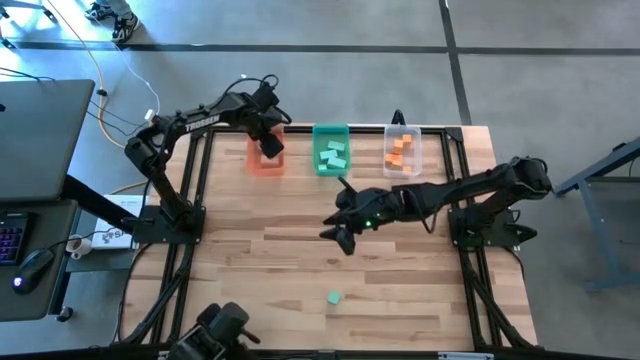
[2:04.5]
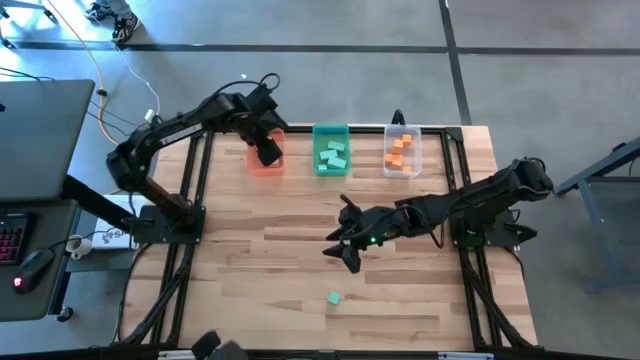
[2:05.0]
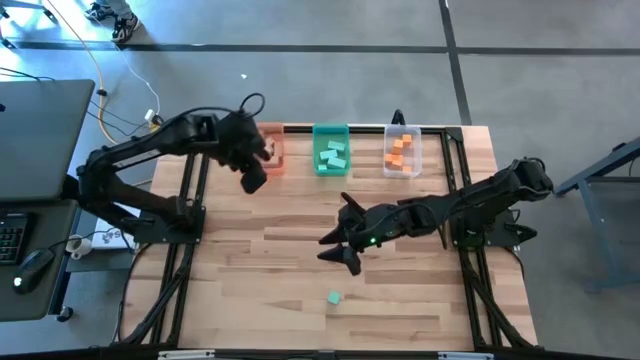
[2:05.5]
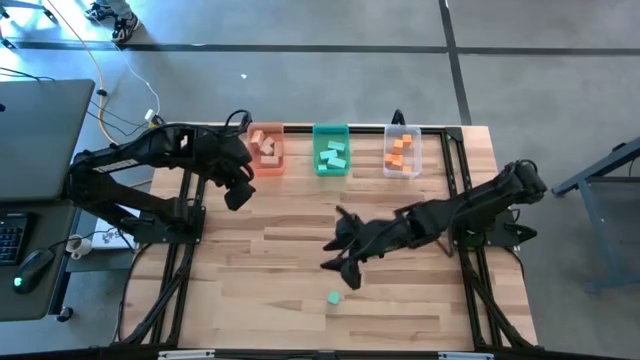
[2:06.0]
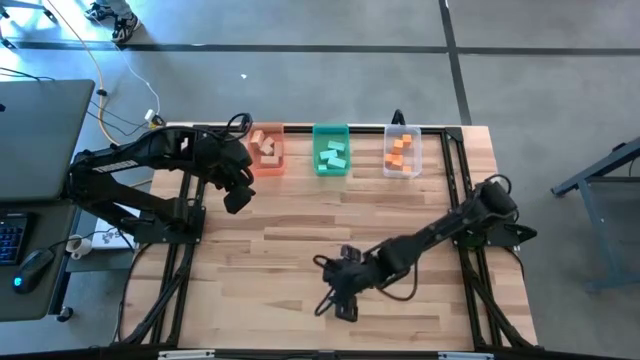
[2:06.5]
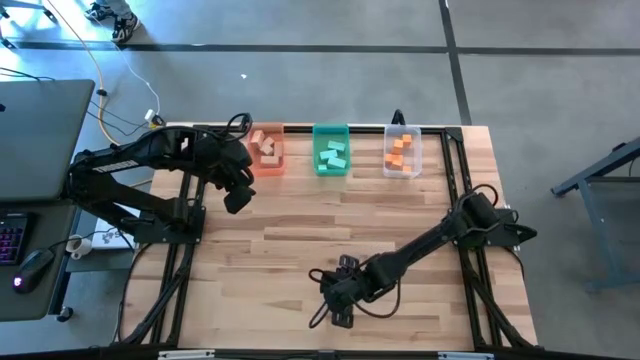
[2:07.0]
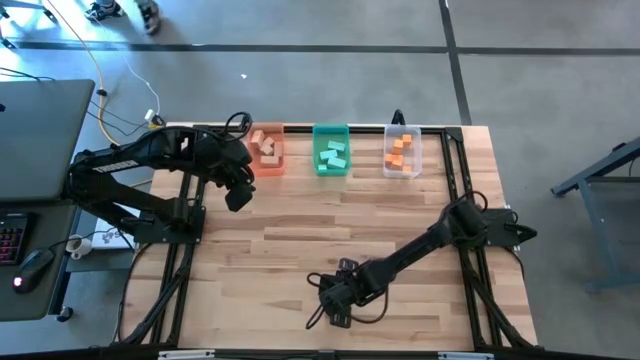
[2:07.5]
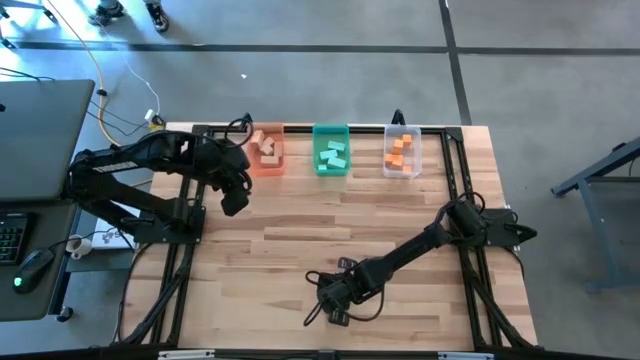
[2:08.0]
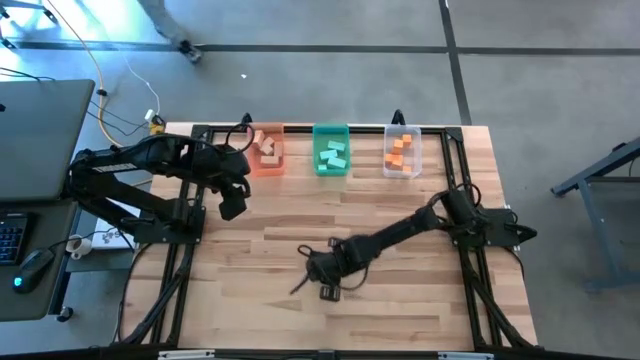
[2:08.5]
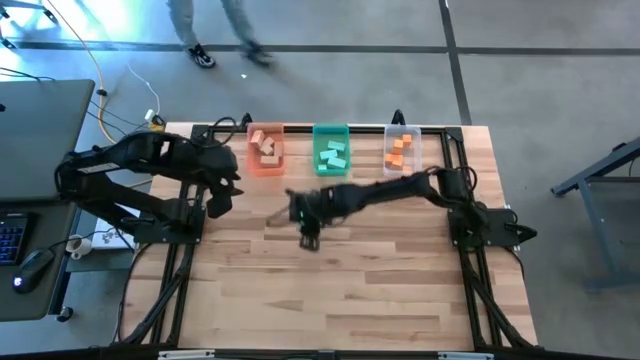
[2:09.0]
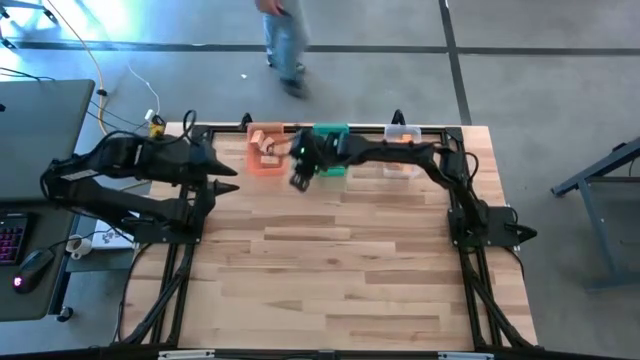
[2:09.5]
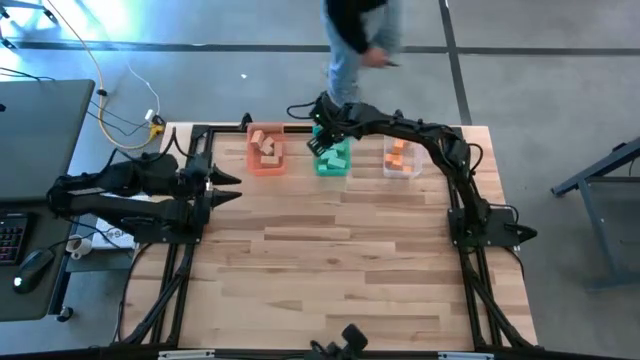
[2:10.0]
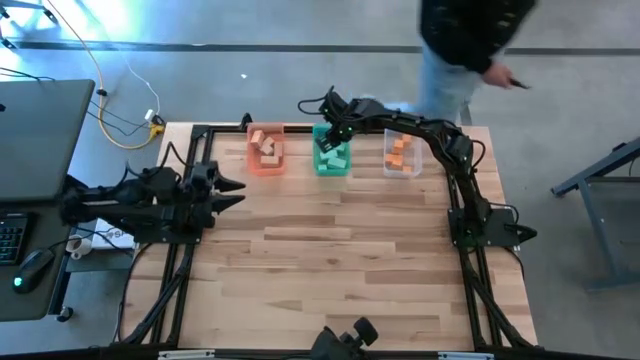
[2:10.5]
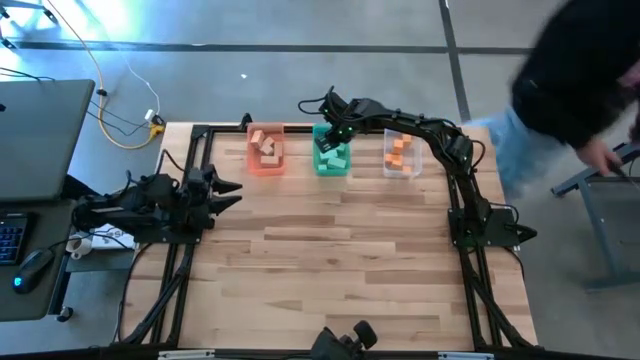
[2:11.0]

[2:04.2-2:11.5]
Task: Sort & place blocks by color
Put the blue block into the blue bin

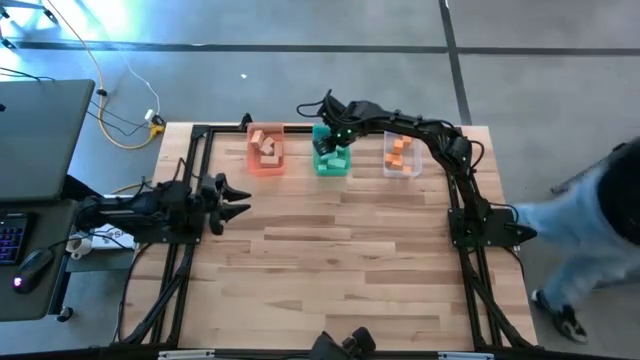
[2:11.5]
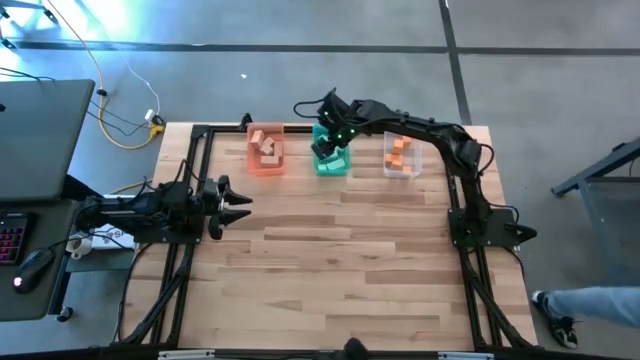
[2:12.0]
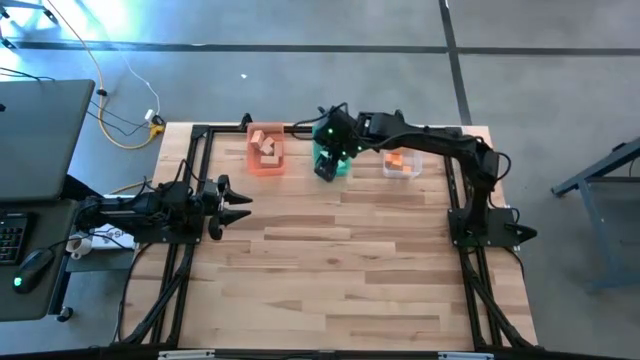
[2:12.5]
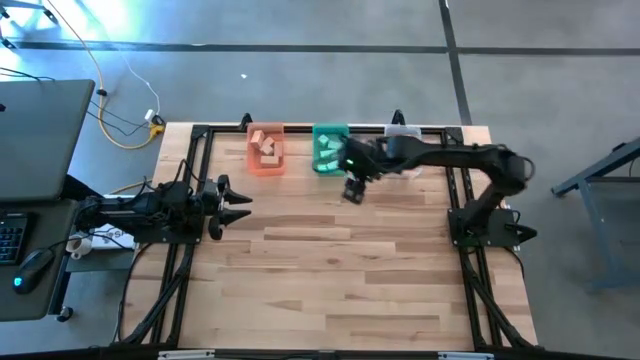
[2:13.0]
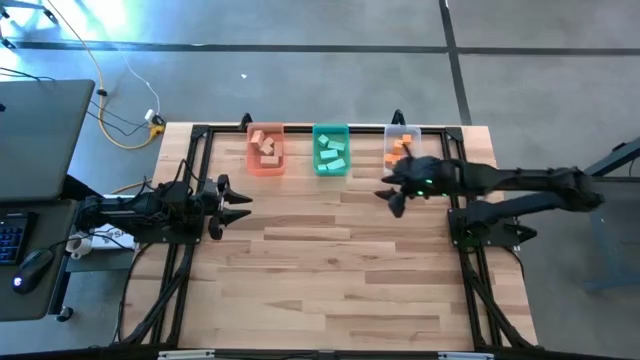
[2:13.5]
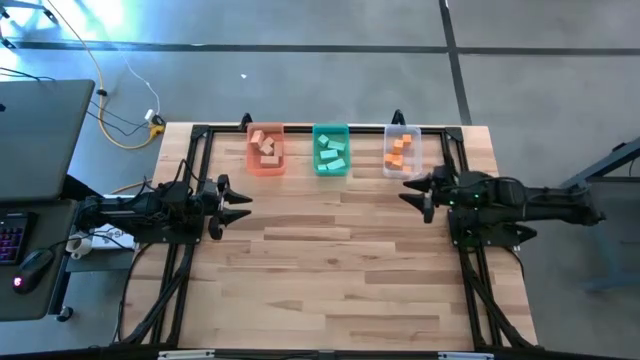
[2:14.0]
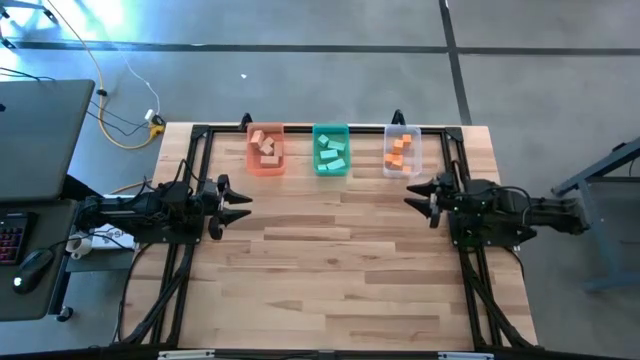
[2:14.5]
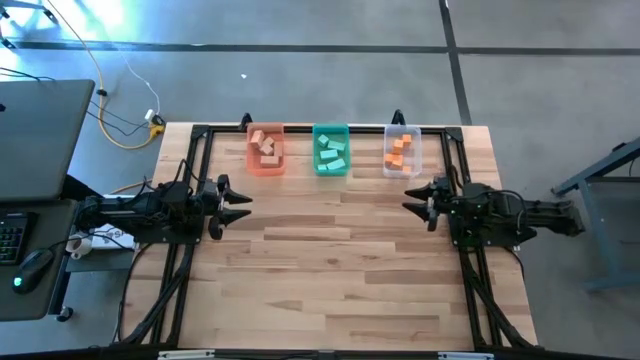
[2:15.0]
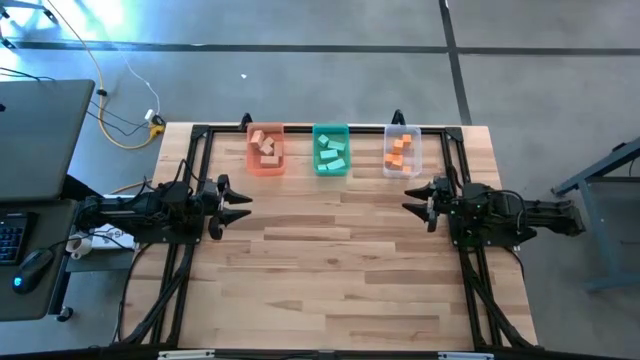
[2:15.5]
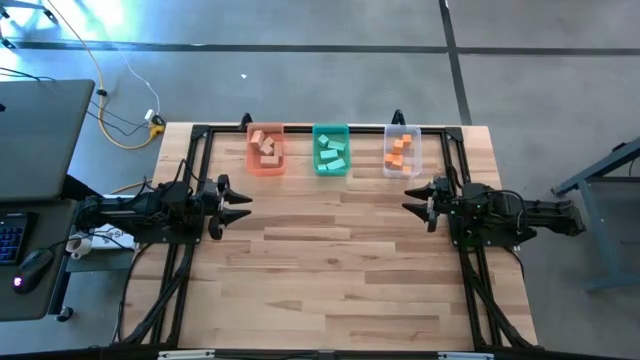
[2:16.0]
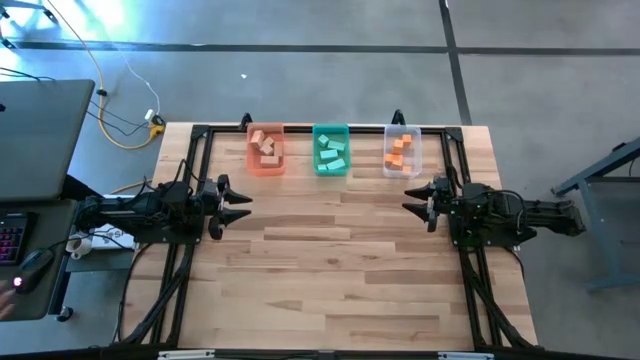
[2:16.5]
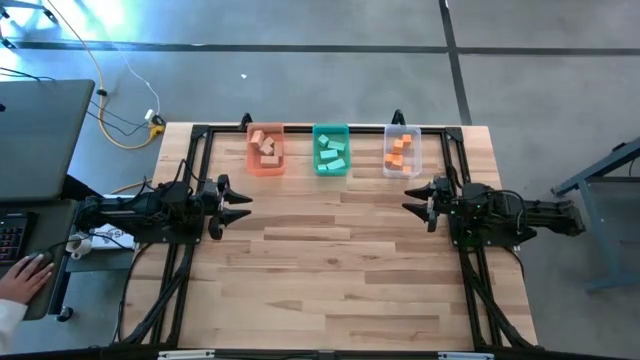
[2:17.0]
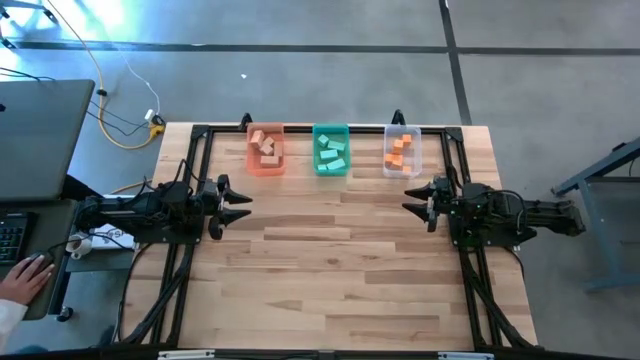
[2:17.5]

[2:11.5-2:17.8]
Return to Home Position

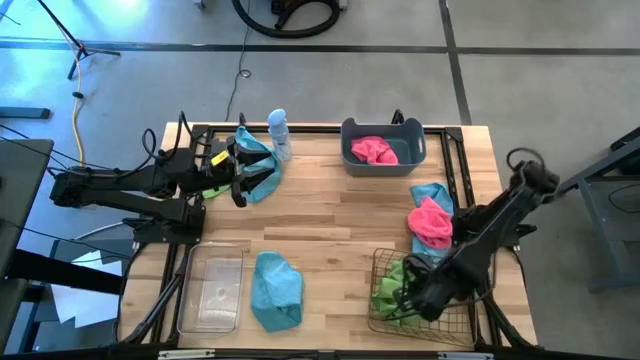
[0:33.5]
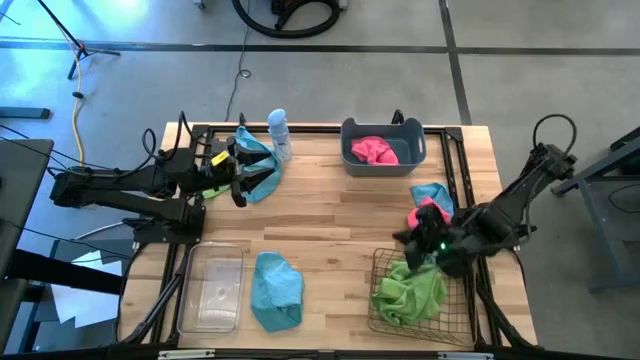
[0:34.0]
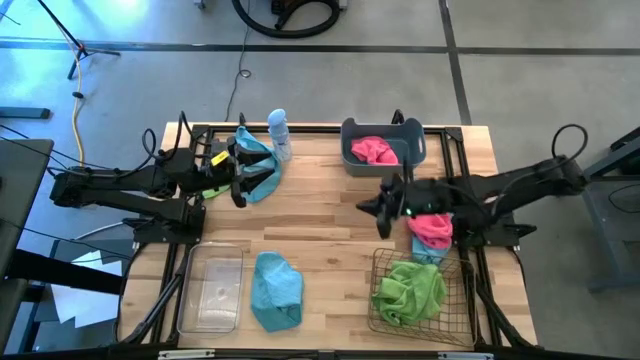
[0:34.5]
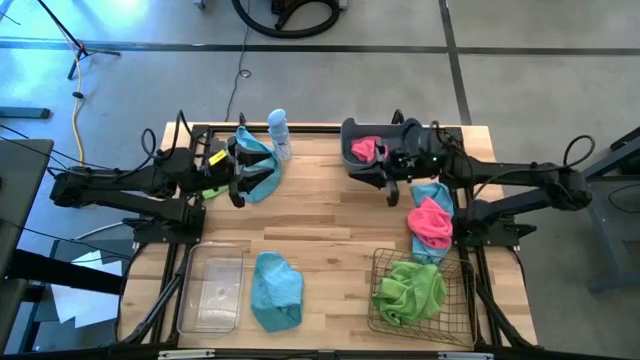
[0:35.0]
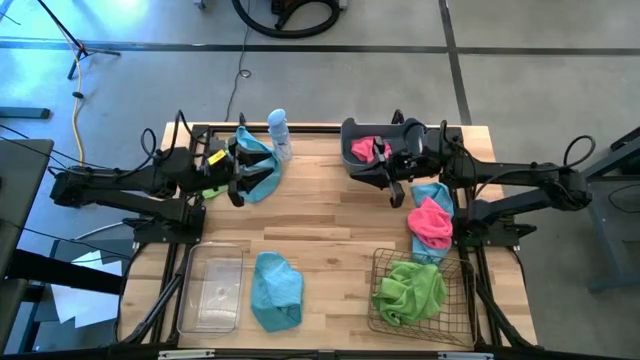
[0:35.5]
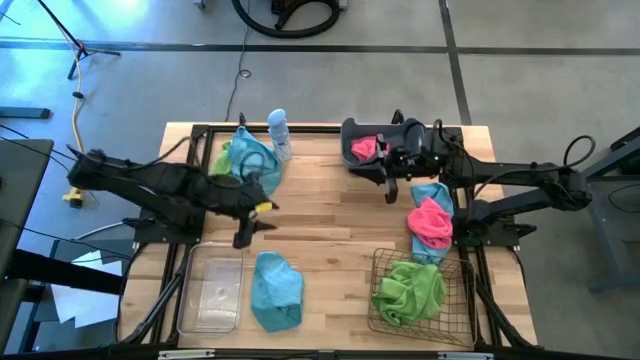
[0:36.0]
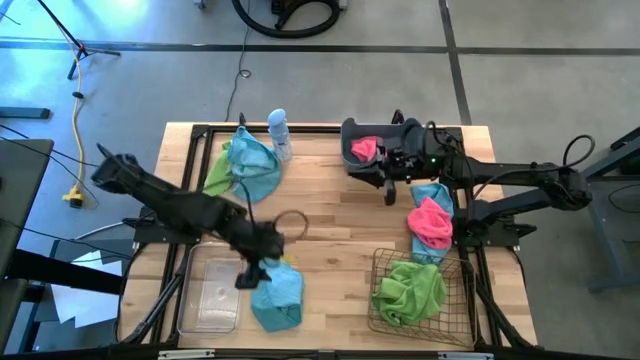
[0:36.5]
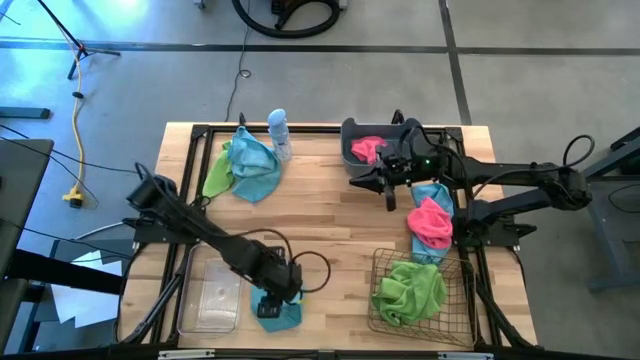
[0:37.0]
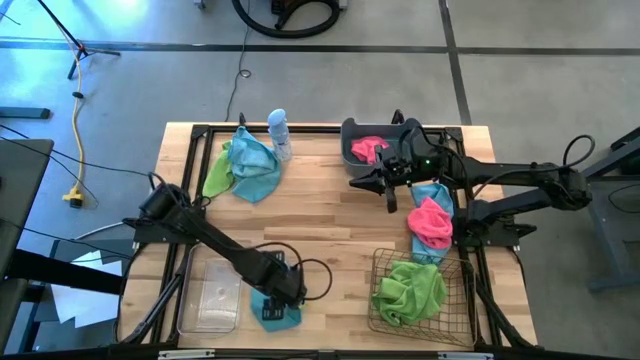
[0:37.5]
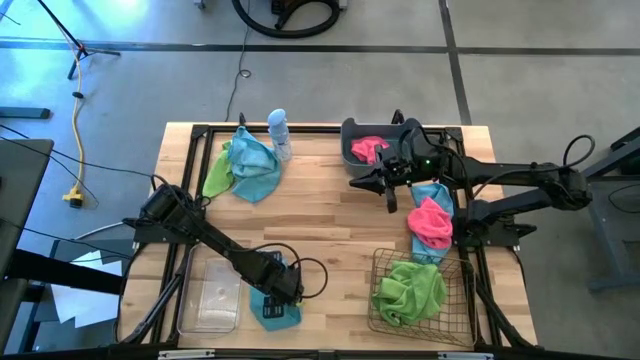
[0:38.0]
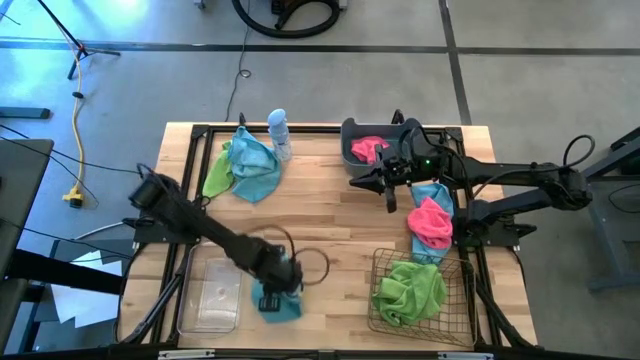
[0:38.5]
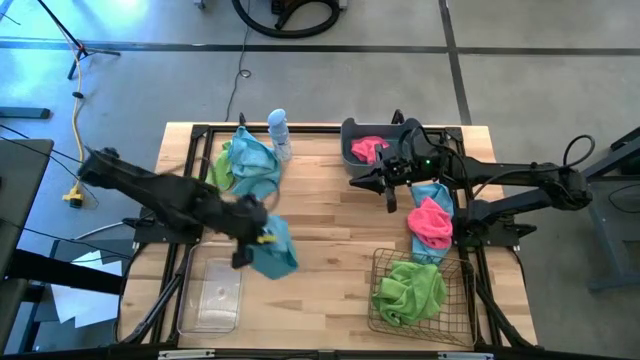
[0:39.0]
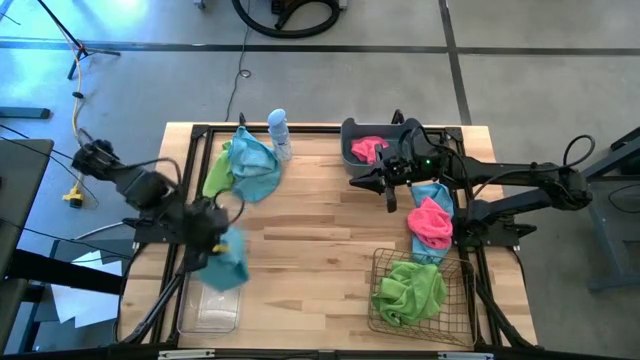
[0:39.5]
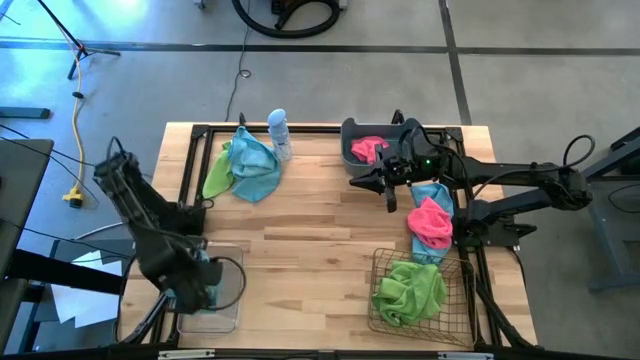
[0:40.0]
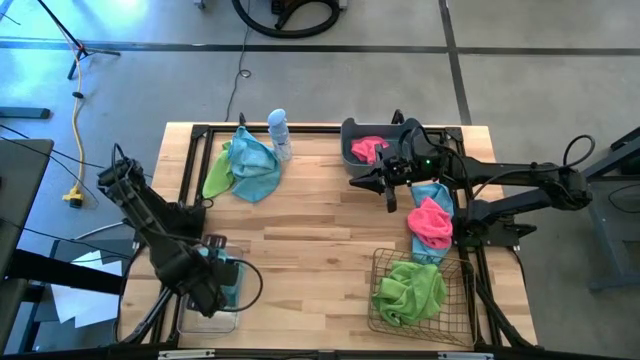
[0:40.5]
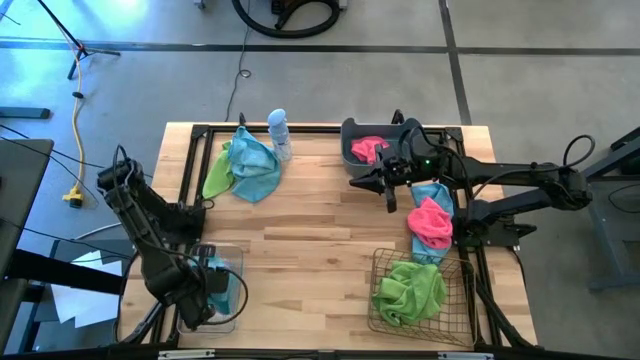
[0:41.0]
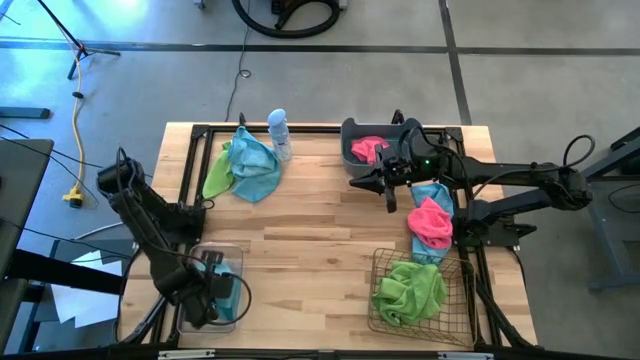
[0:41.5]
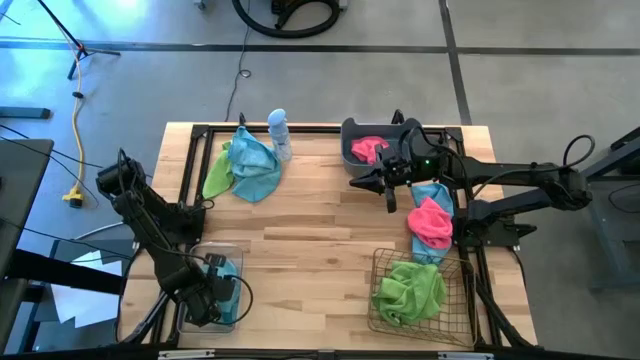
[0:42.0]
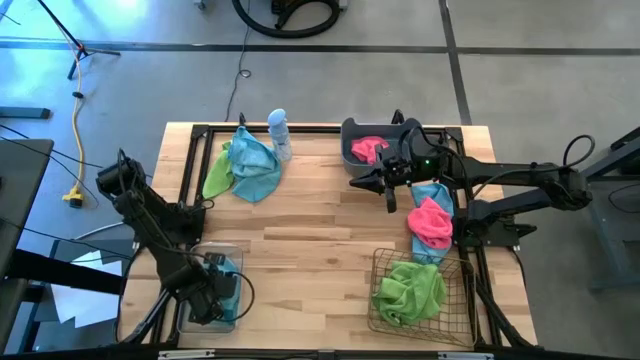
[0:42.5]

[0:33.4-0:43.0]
Task: Sort microfiber towel by color & place in baskets
Put the bottom left blue microfiber towel into the transparent bin
